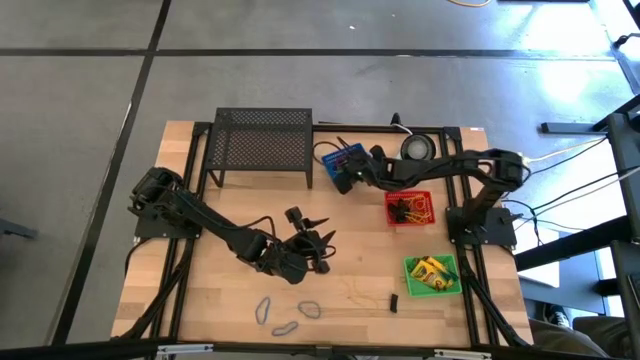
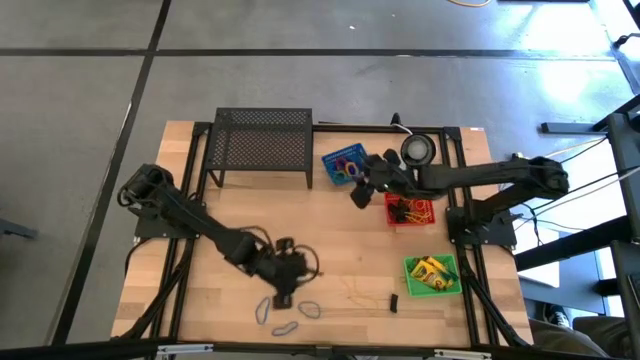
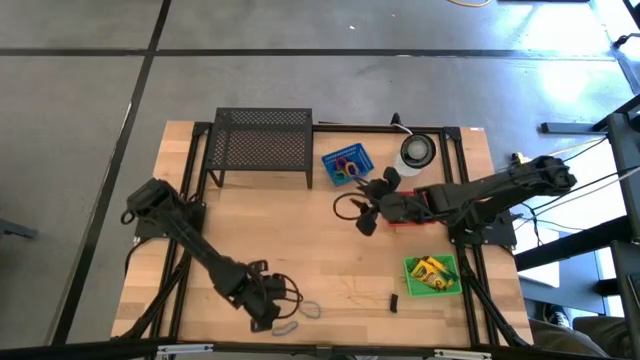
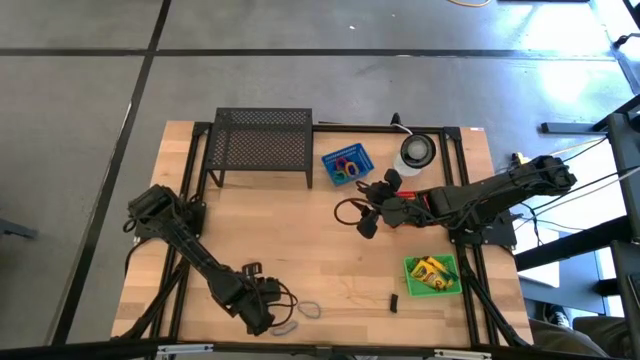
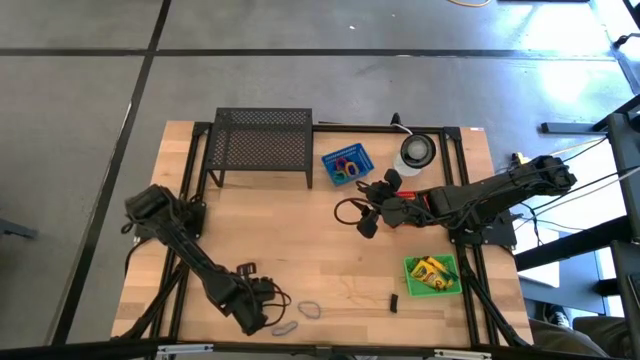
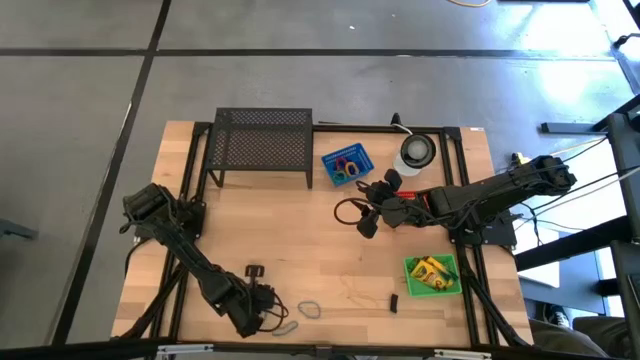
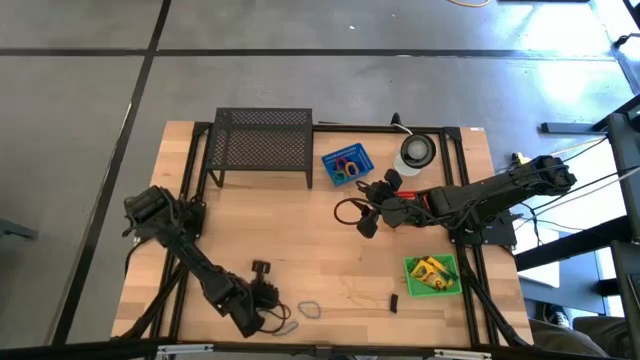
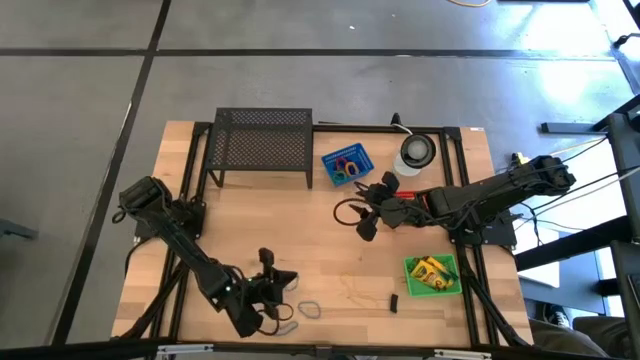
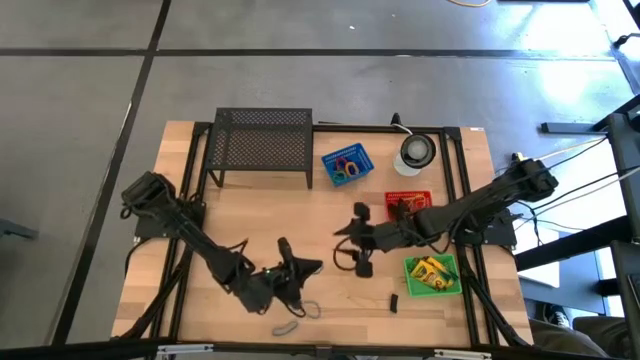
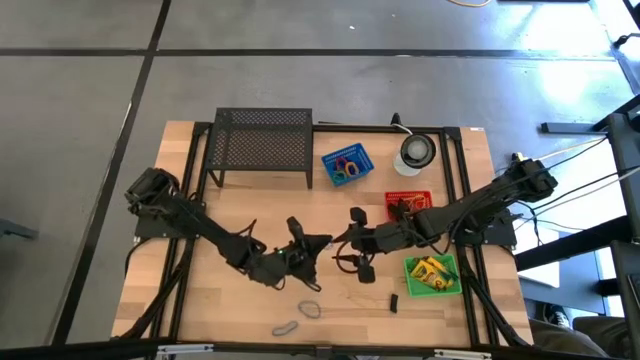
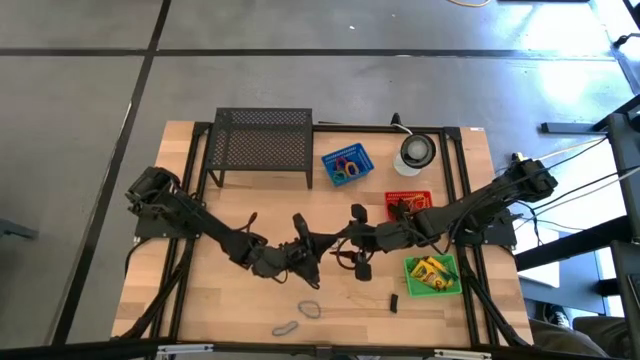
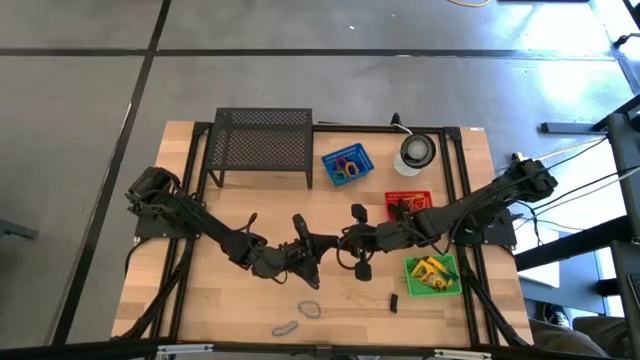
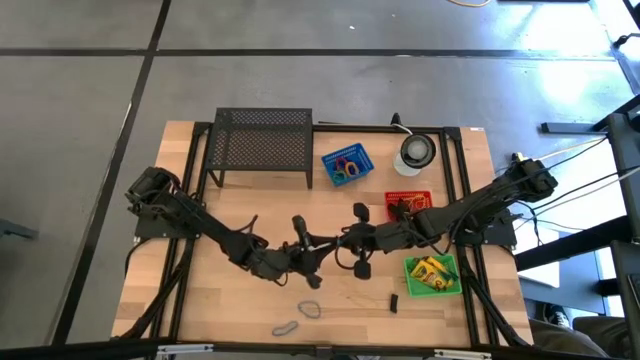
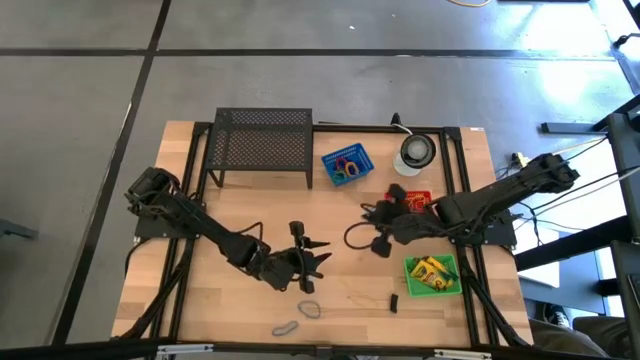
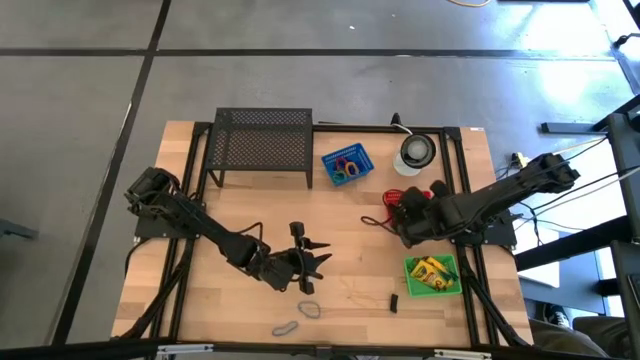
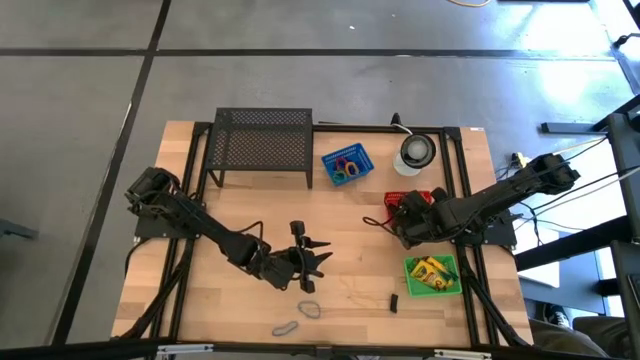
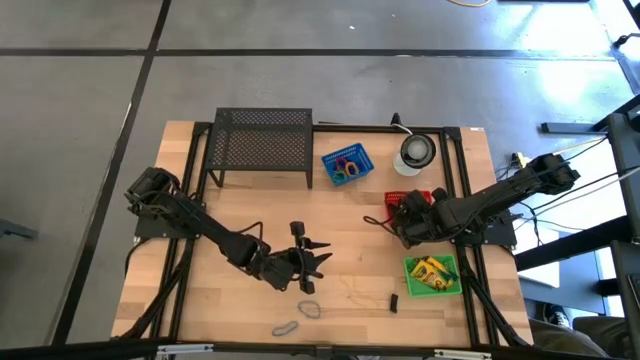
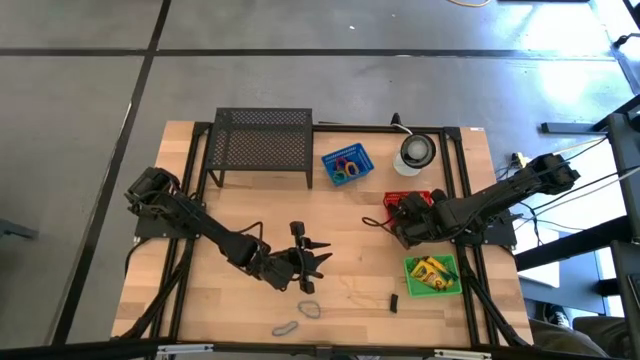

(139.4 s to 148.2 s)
Task: Pick & Place Office Desk Supplies
Put the blue rubber band into the red bin

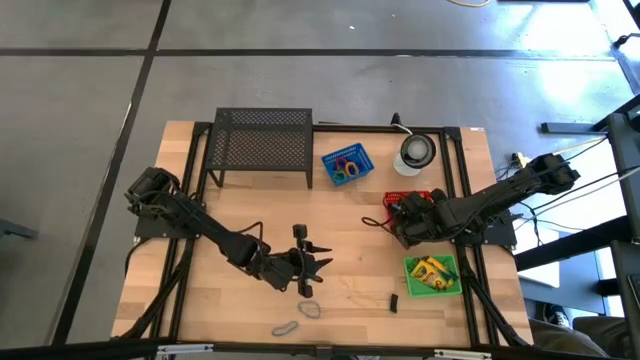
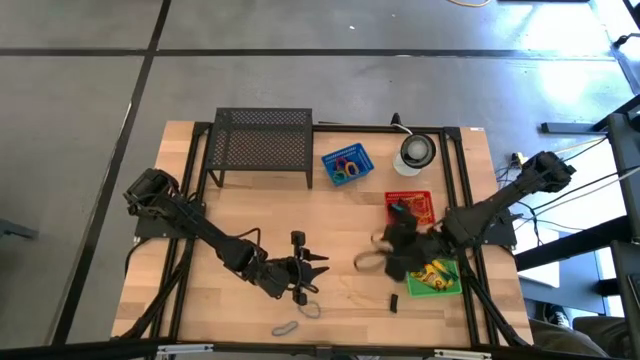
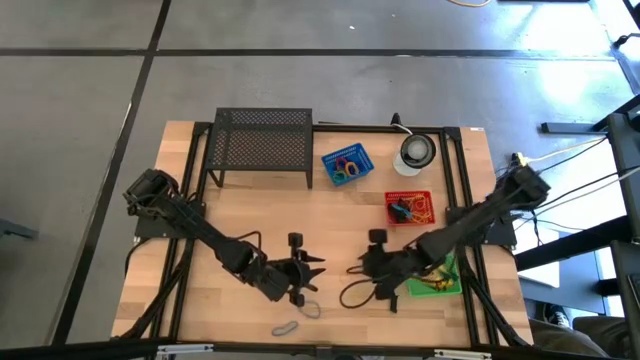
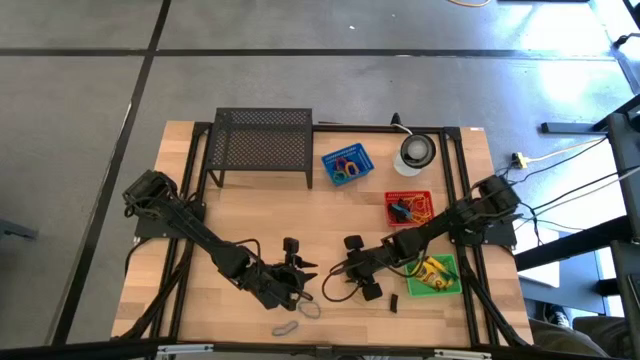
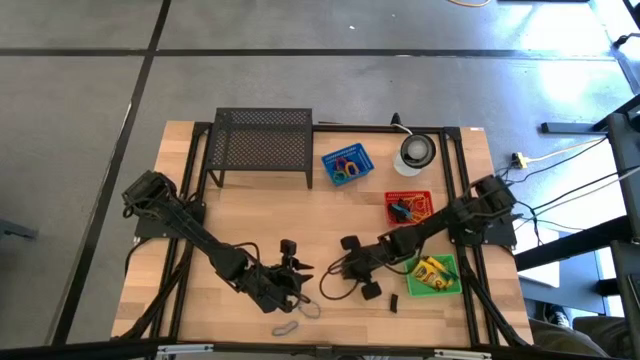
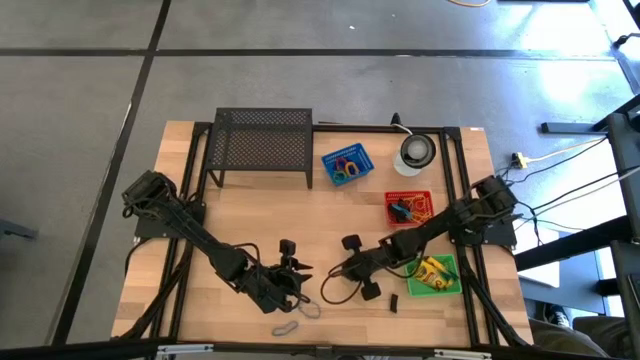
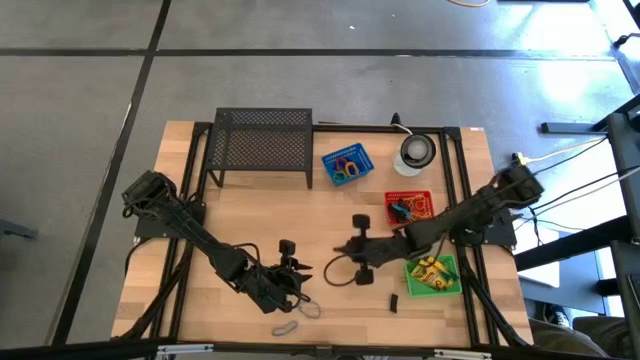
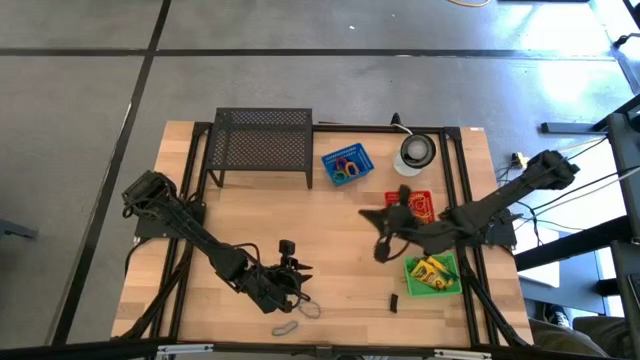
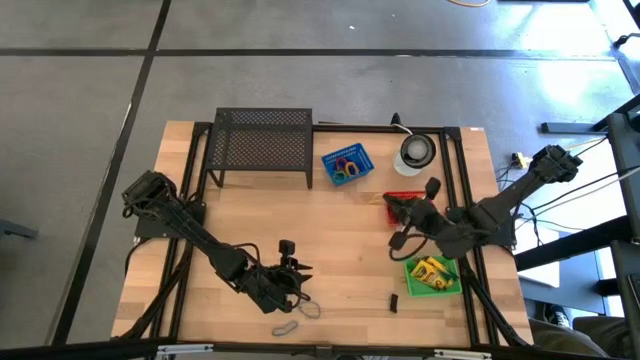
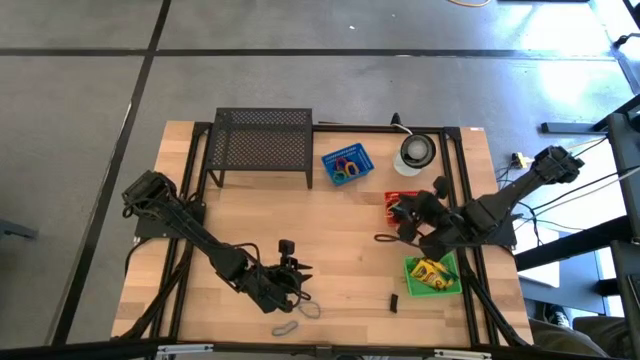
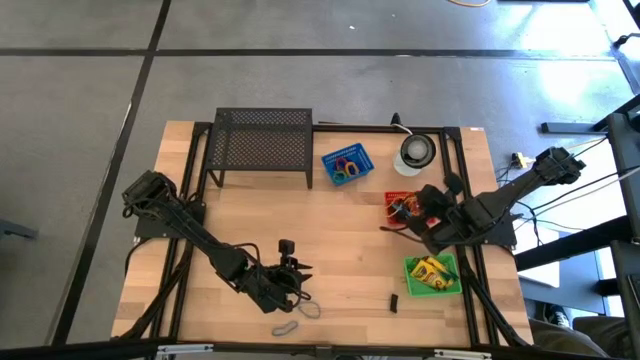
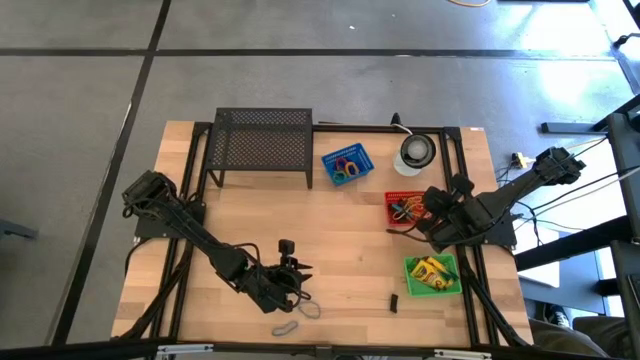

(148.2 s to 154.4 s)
Put the yellow rubber band into the red bin

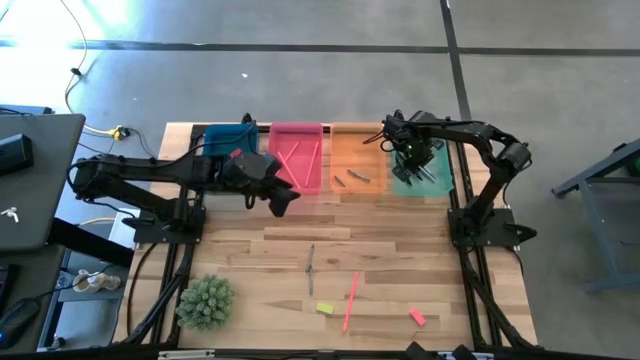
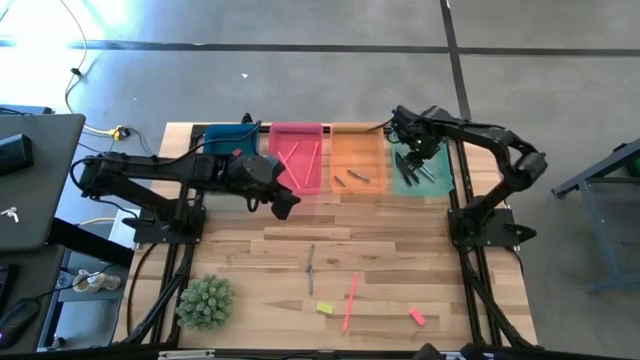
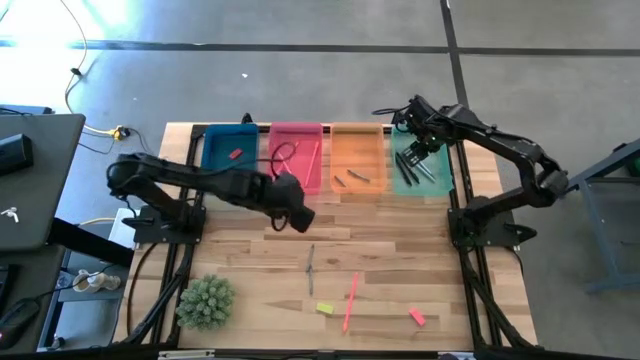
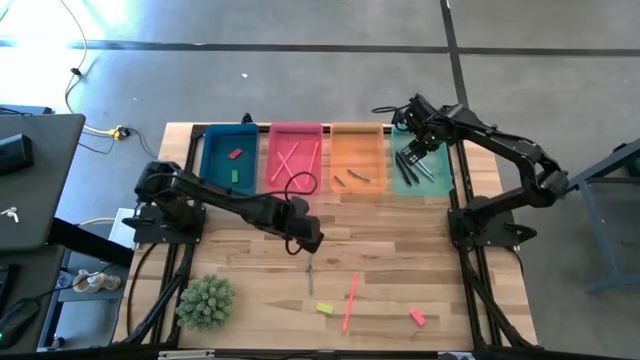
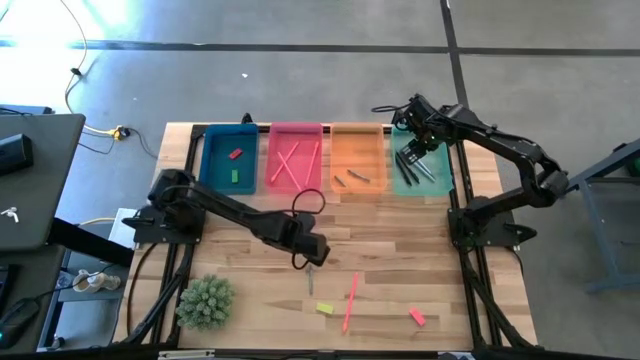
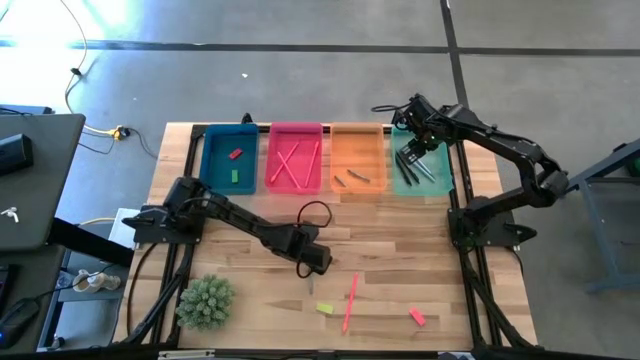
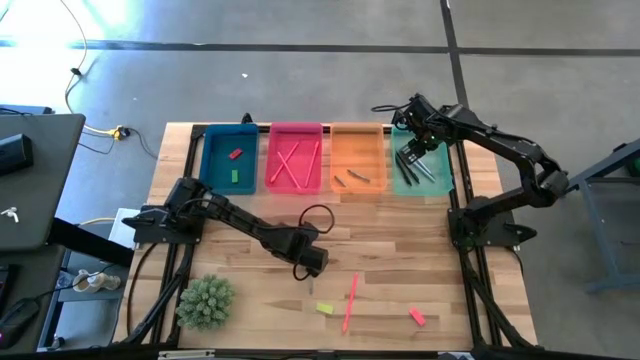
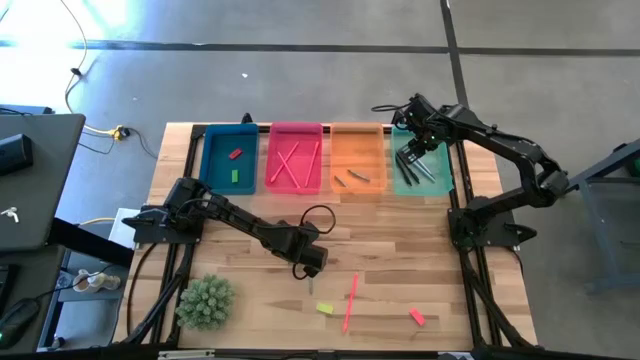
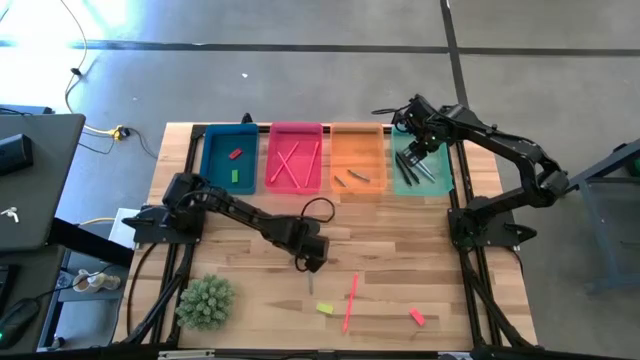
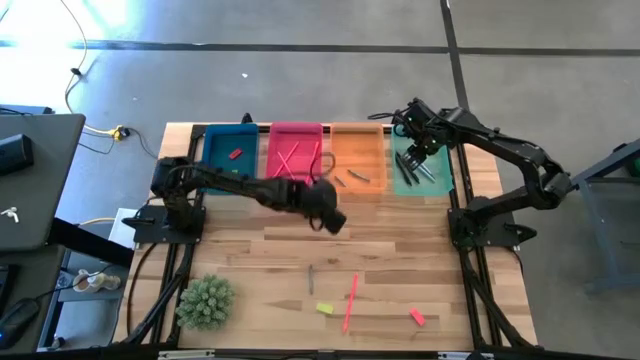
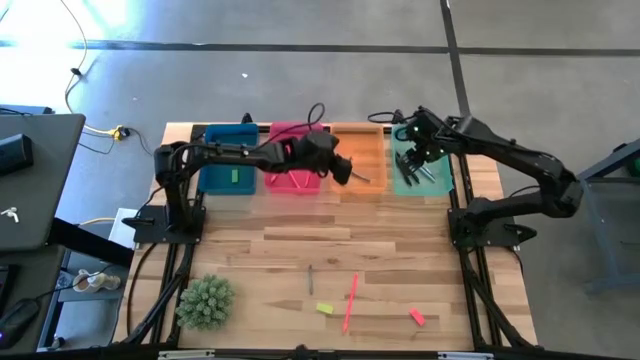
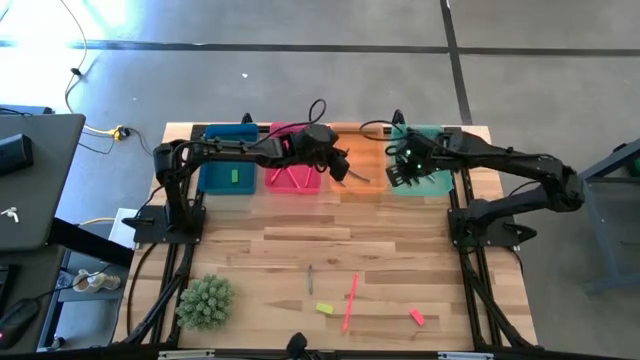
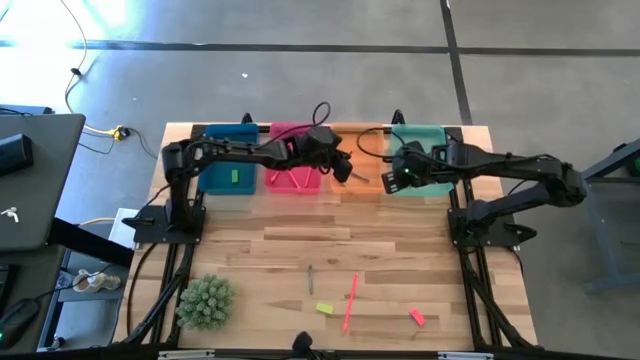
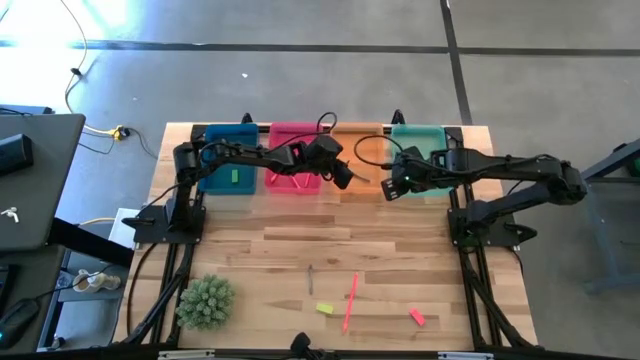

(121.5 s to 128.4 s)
Task: Sort crayons/erasers/pens/pencils in bins
Put the gray crayon into the orange bin
